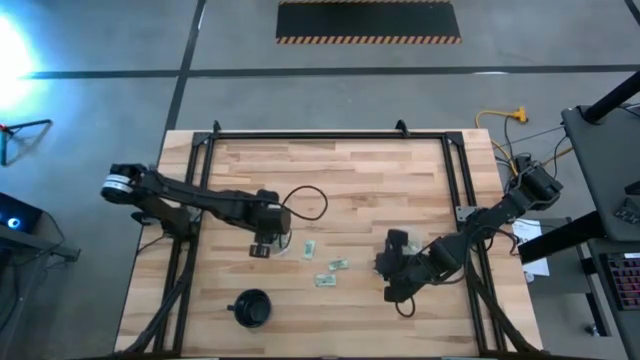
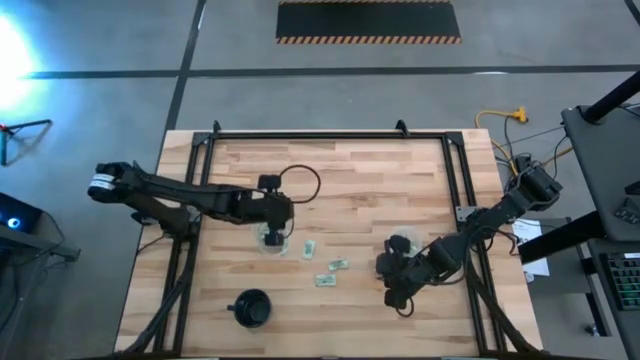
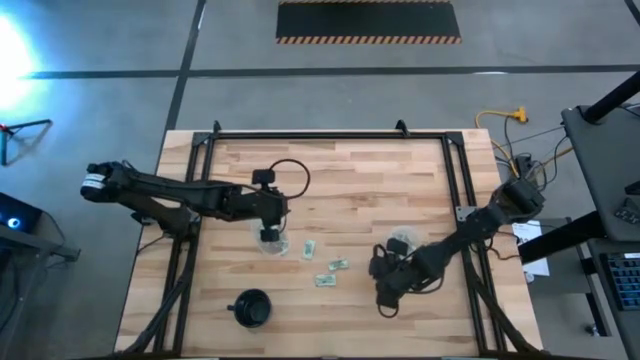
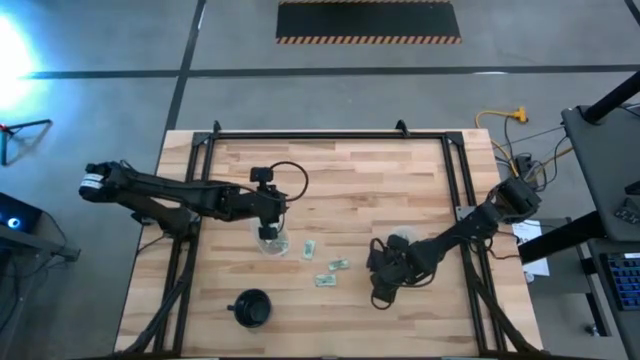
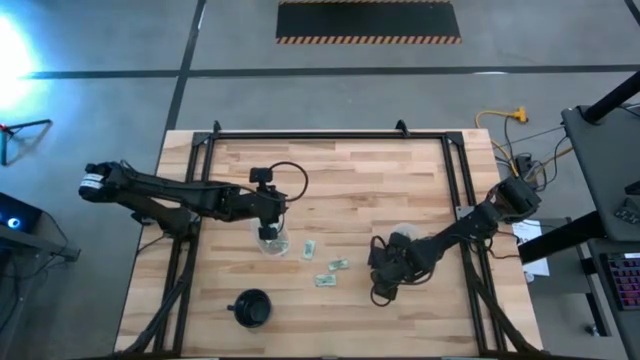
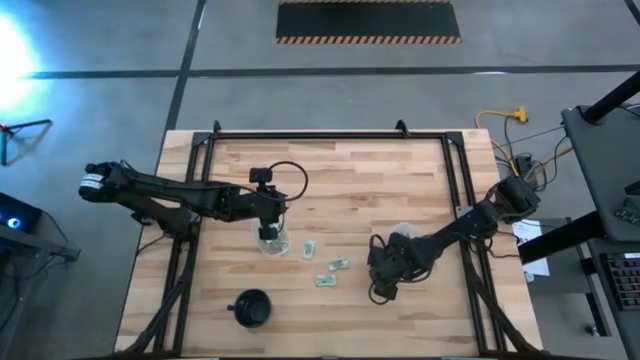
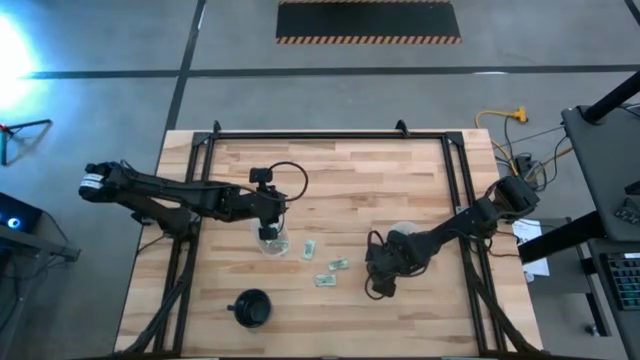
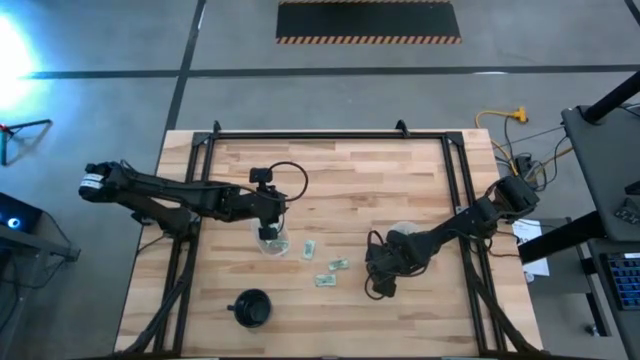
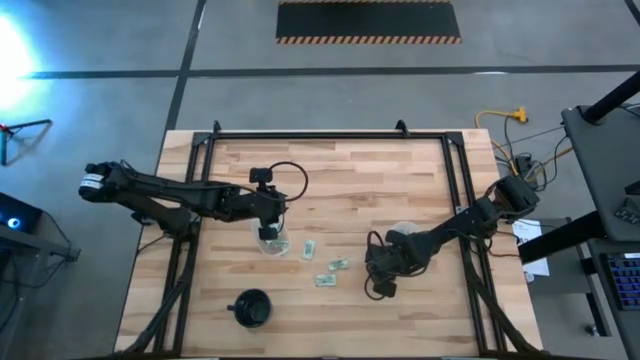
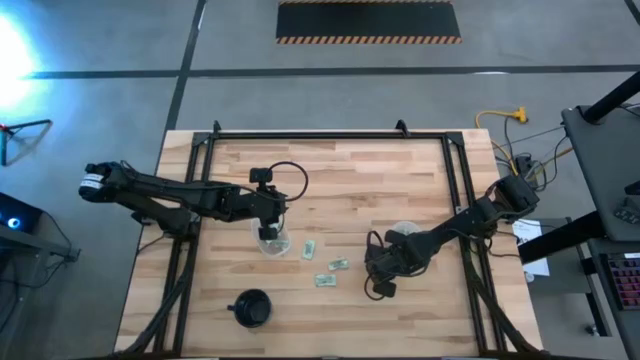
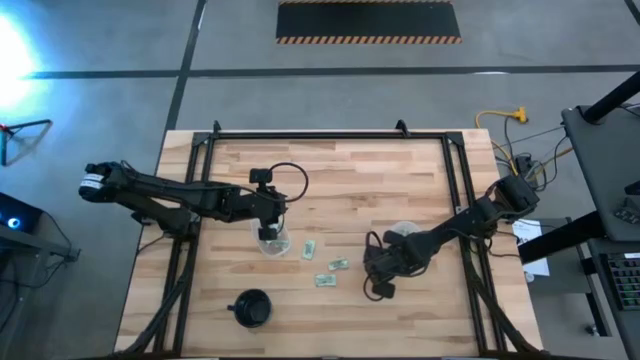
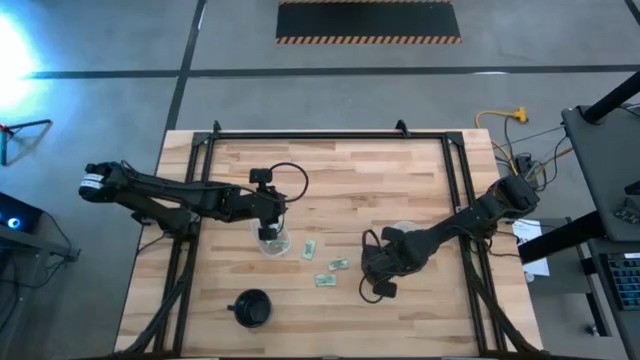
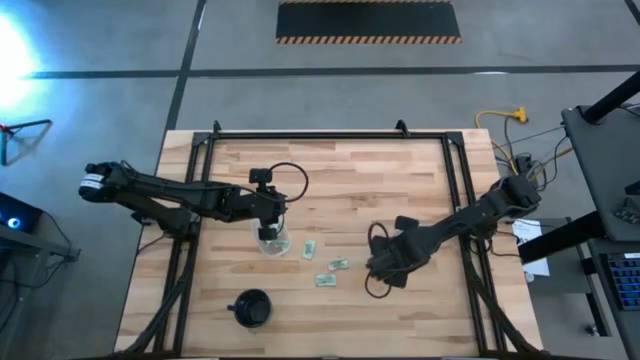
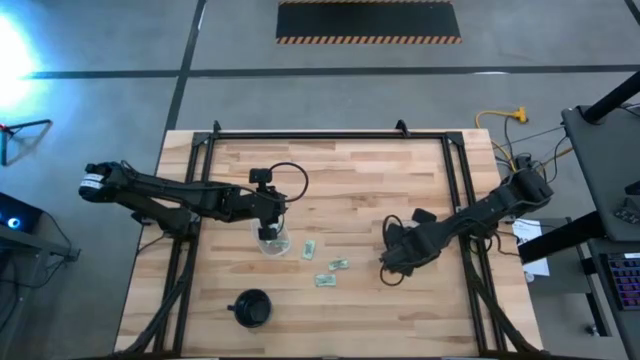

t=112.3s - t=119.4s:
Task: Pick and place Stevia / Truvia into bins
Put the stevia packet into the round transparent container

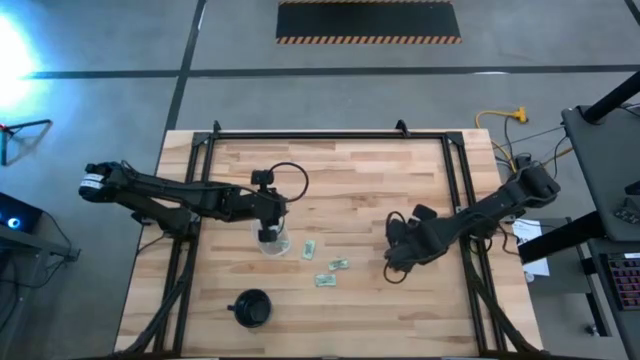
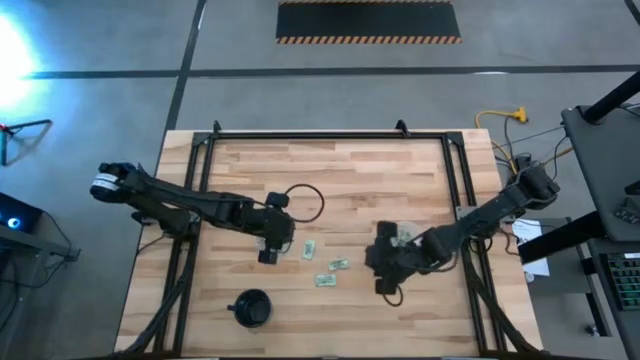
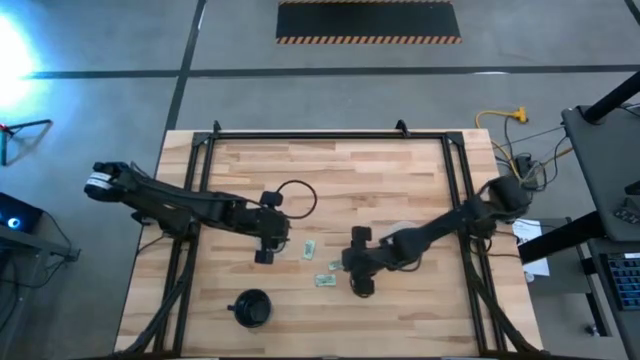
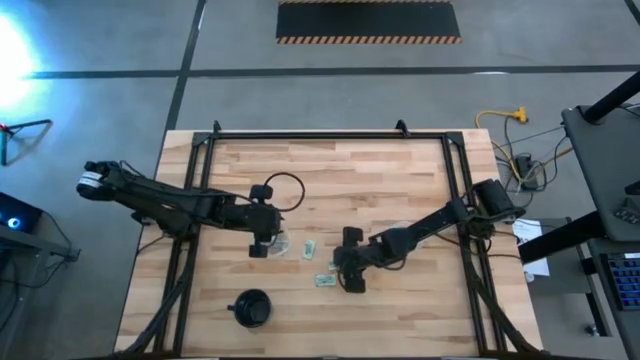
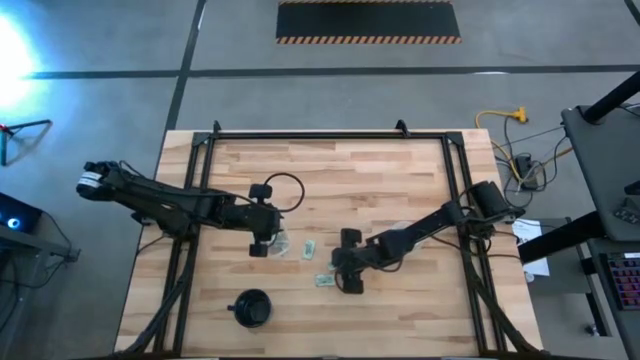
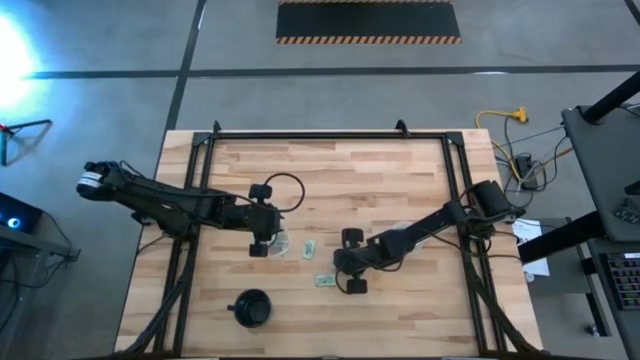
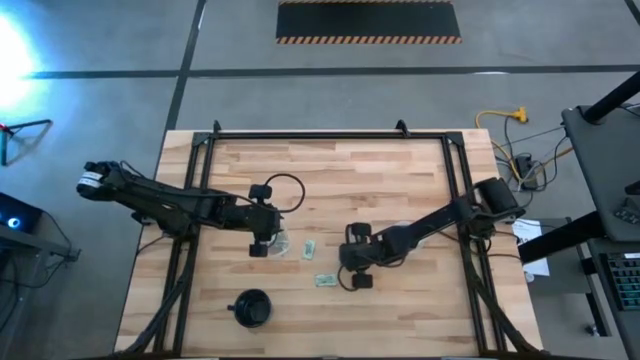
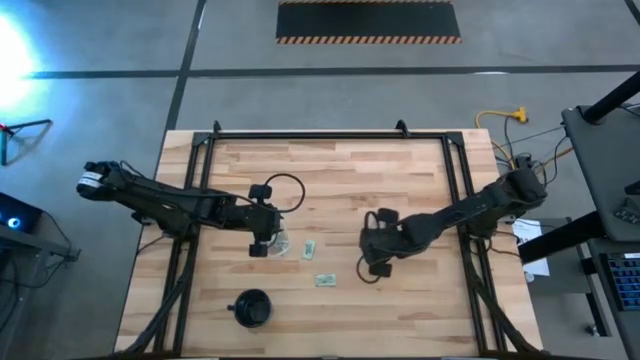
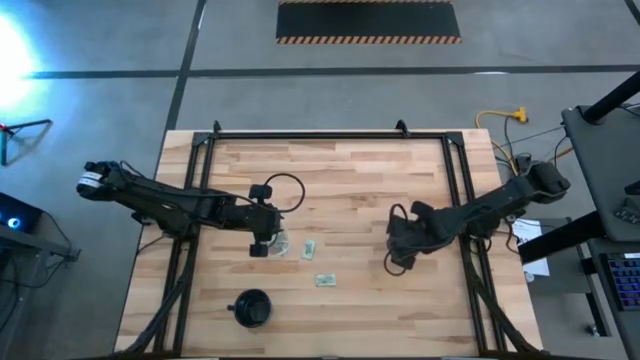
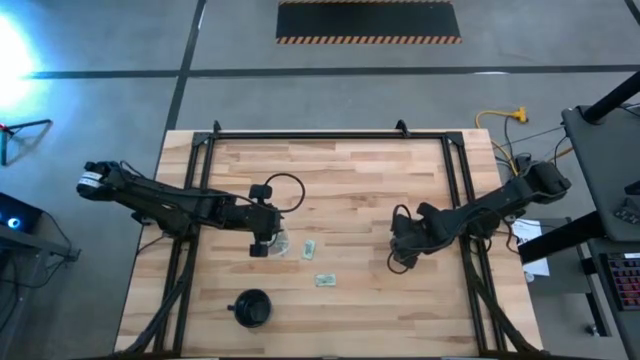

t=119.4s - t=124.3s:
Put the stevia packet into the round transparent container

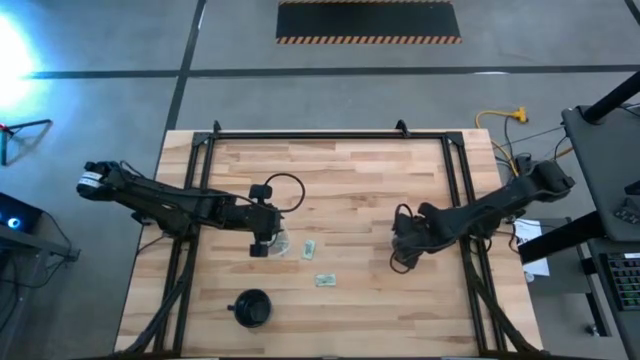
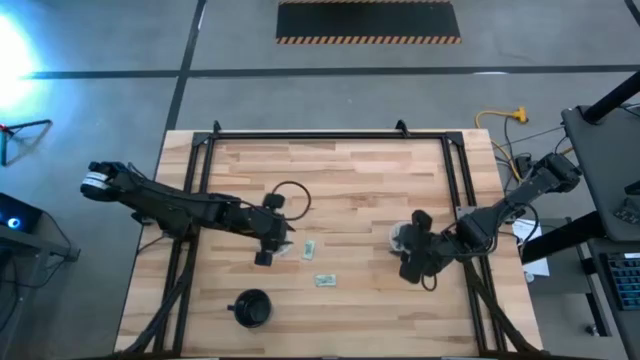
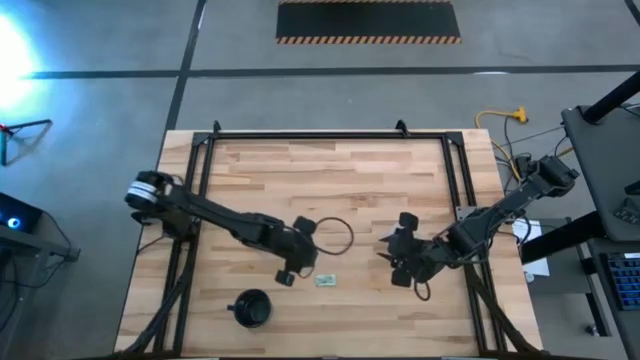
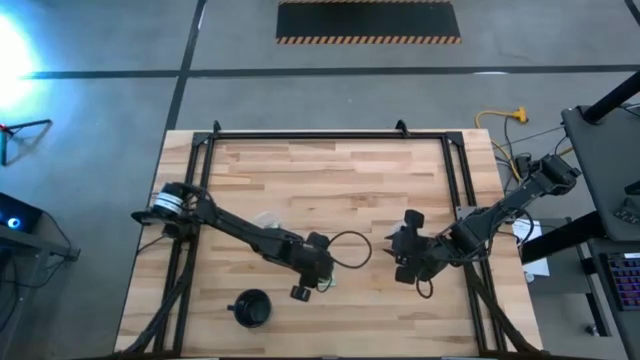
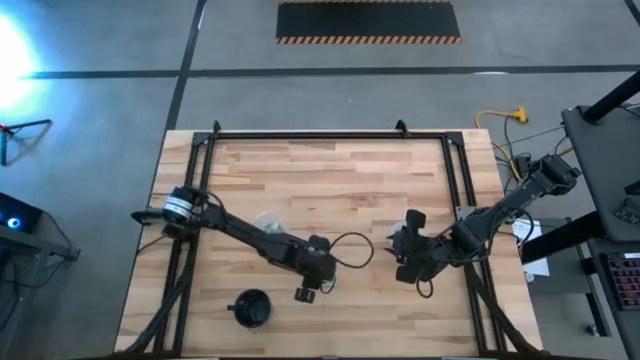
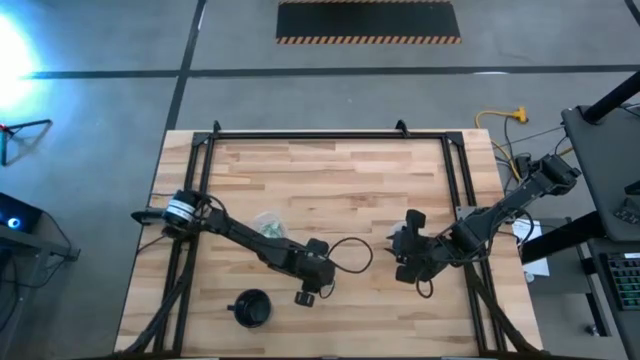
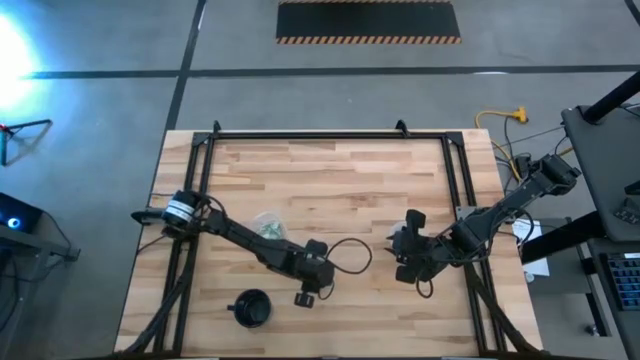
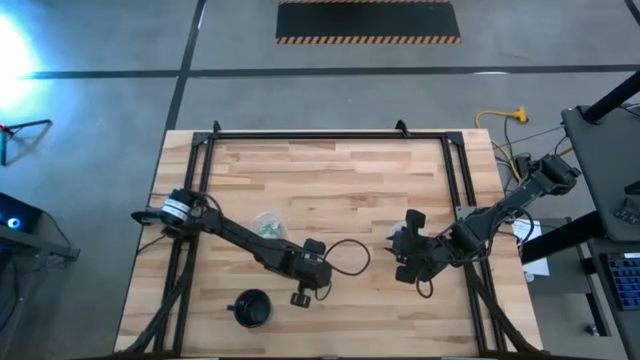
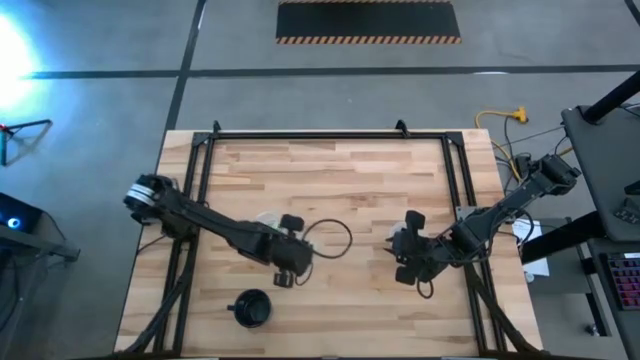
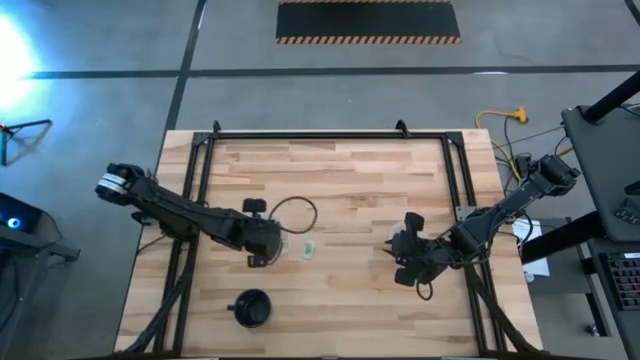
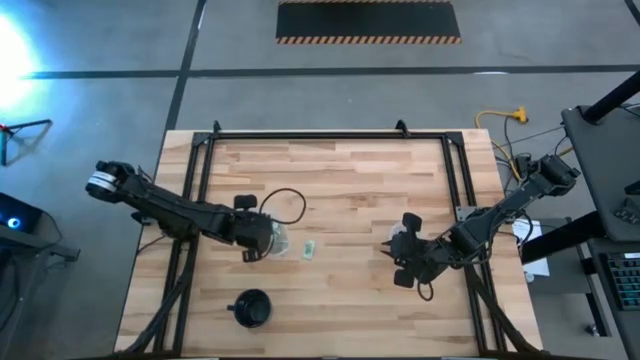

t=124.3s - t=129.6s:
Put the stevia packet into the oval transparent container
